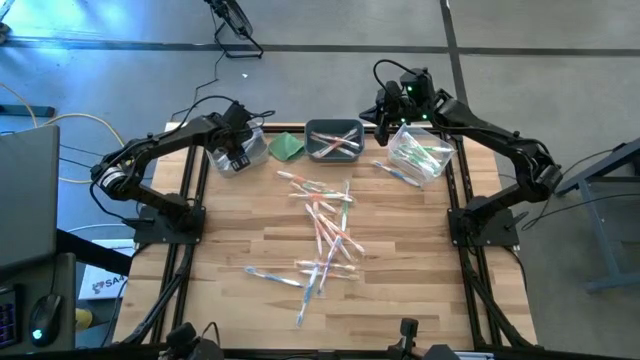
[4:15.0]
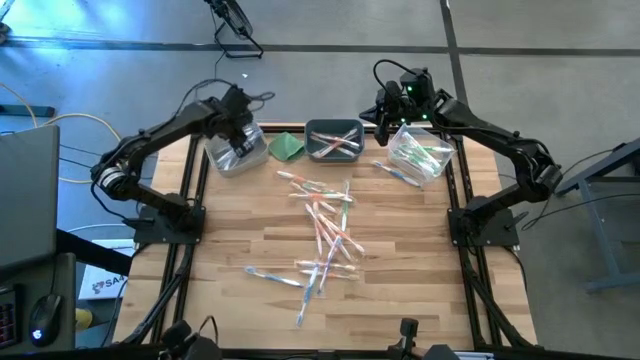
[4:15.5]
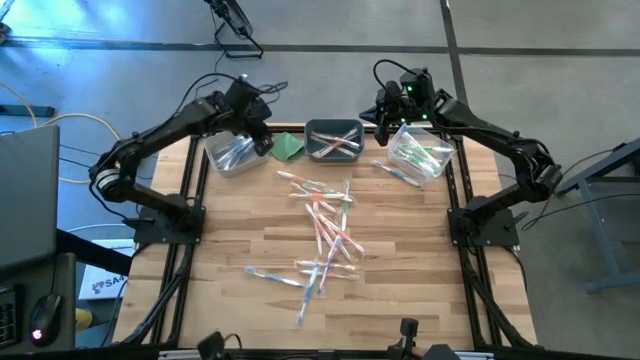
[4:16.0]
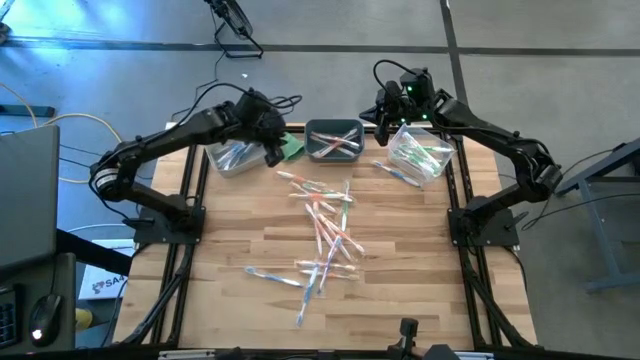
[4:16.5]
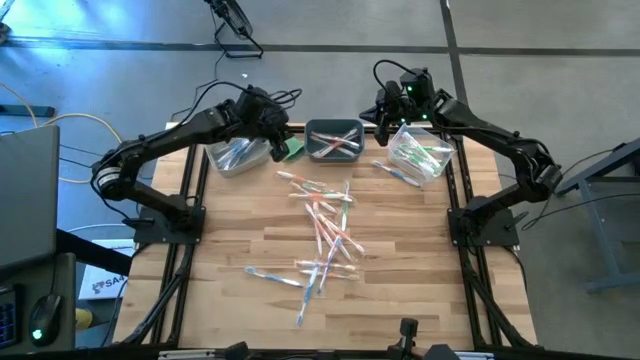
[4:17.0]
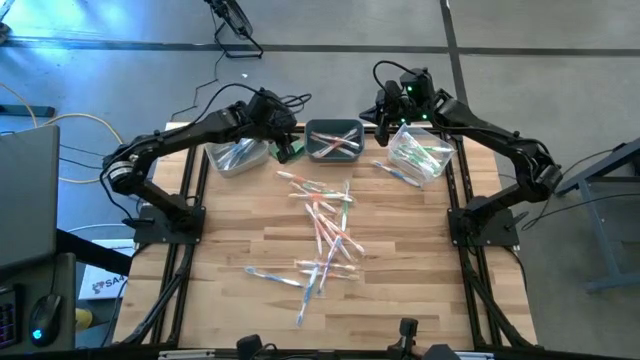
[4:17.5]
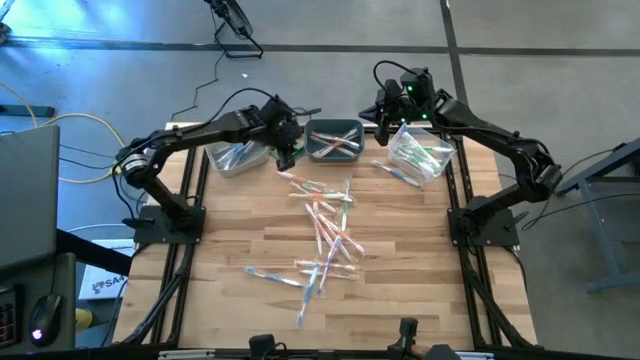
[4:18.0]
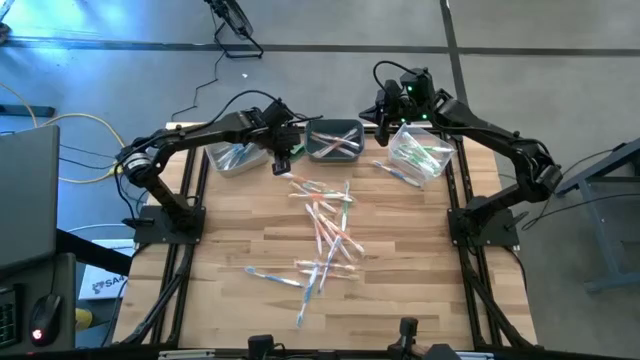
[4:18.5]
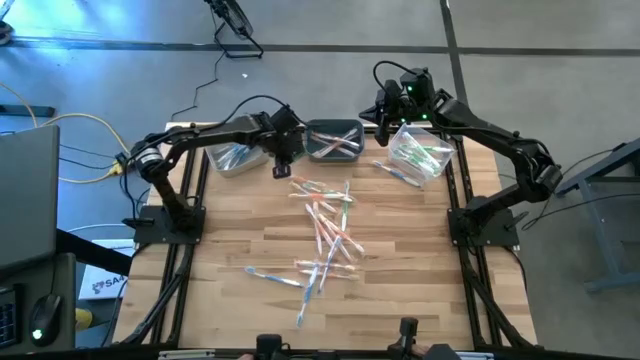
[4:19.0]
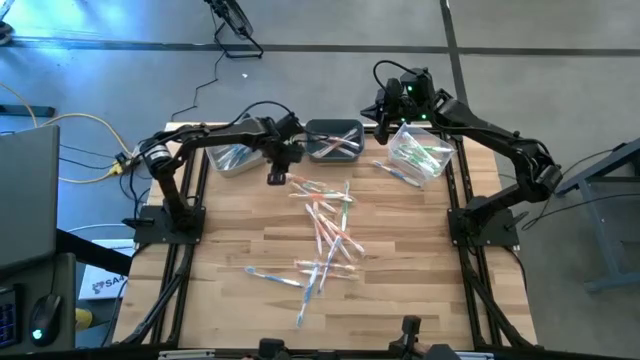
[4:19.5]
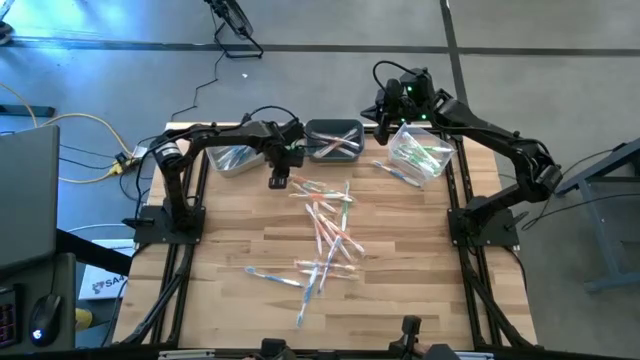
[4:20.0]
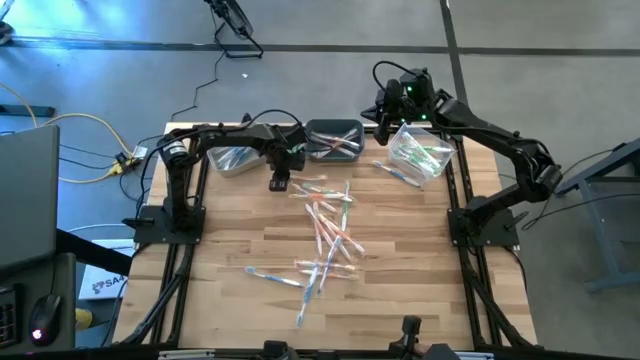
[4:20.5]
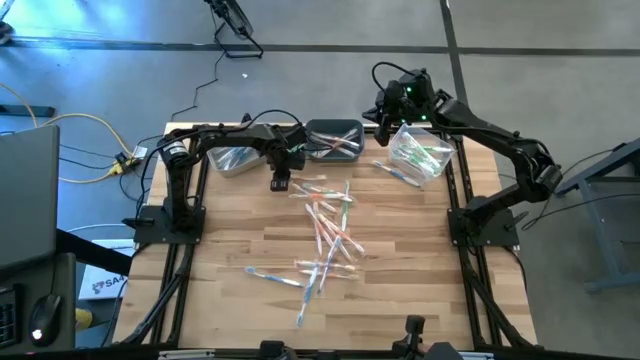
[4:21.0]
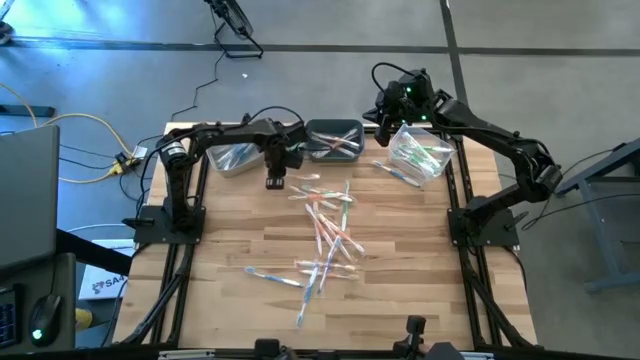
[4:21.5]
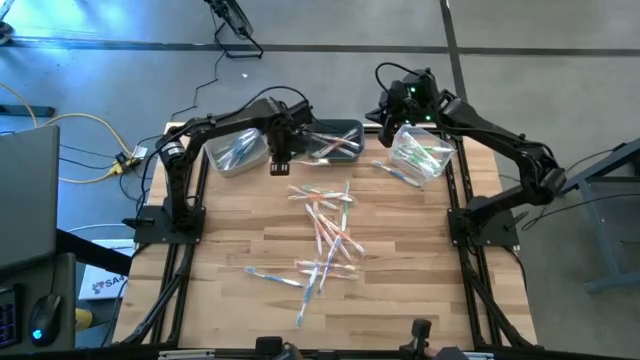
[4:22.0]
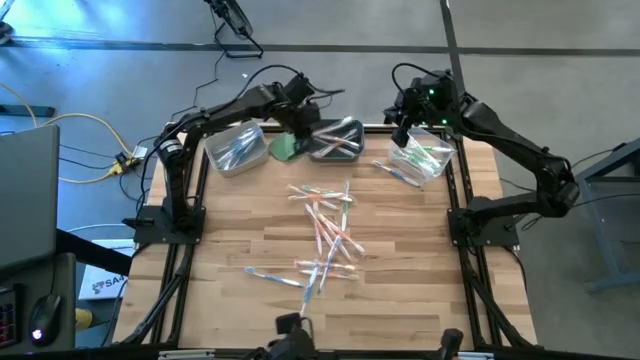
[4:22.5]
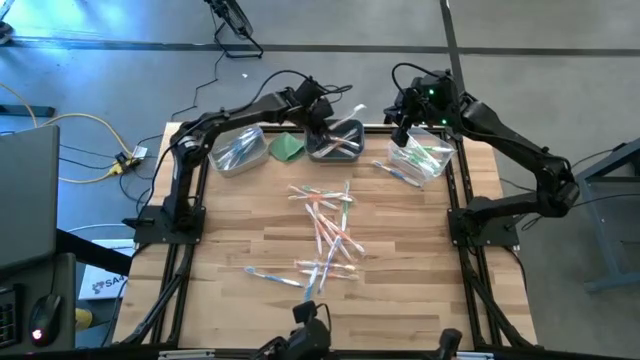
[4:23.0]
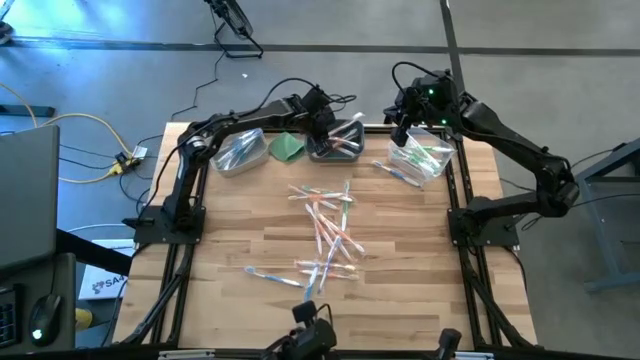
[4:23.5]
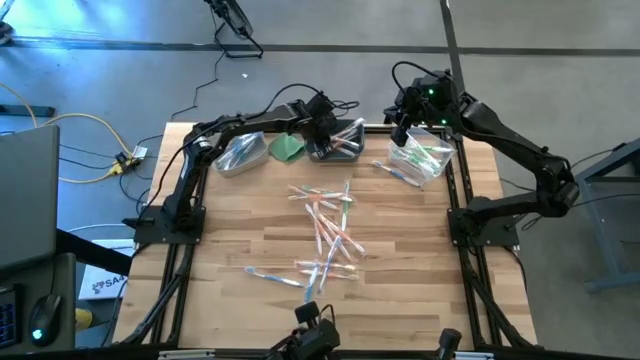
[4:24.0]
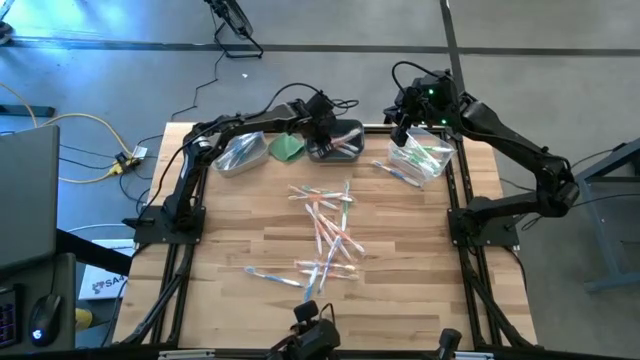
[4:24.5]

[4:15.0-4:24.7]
Task: Pick & Place Toothbrushes
Put the orange toothbrush into the blue bin

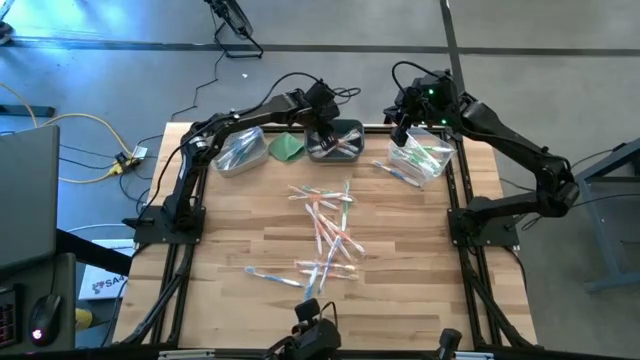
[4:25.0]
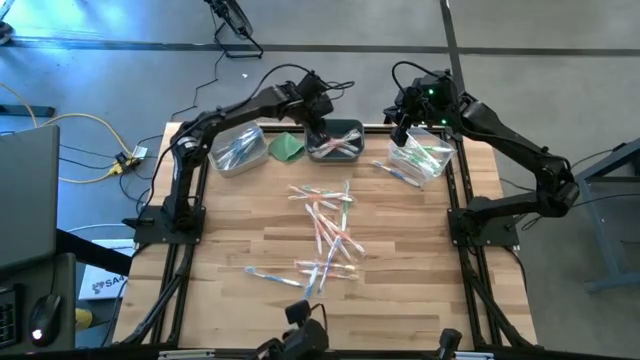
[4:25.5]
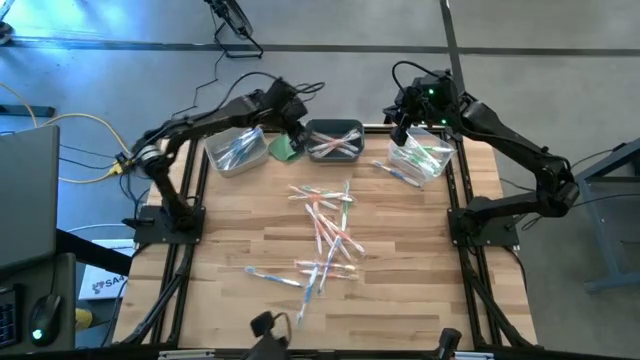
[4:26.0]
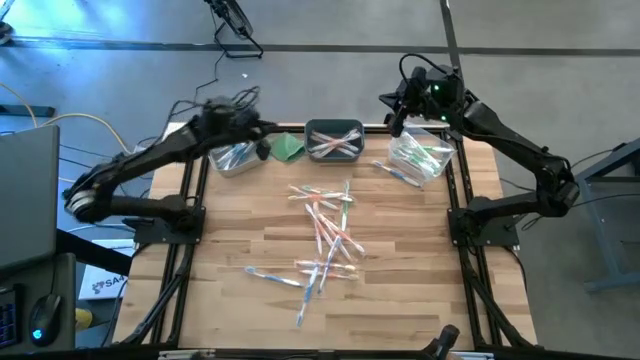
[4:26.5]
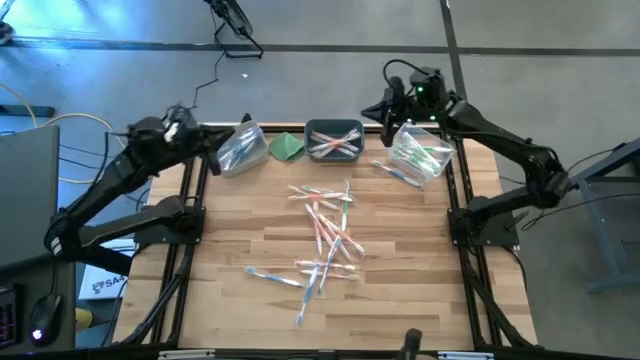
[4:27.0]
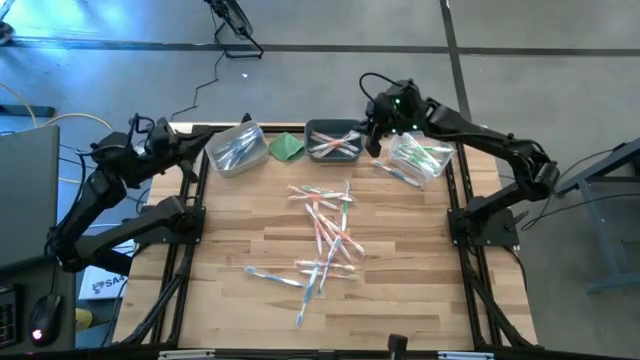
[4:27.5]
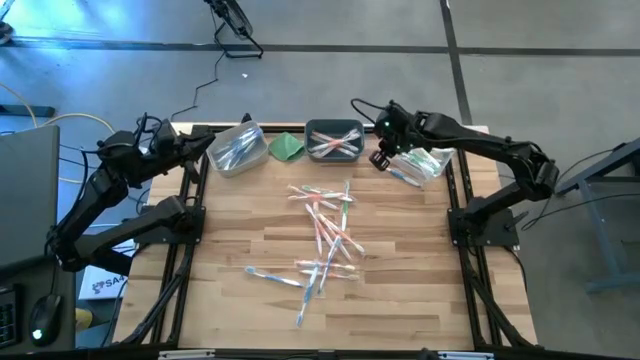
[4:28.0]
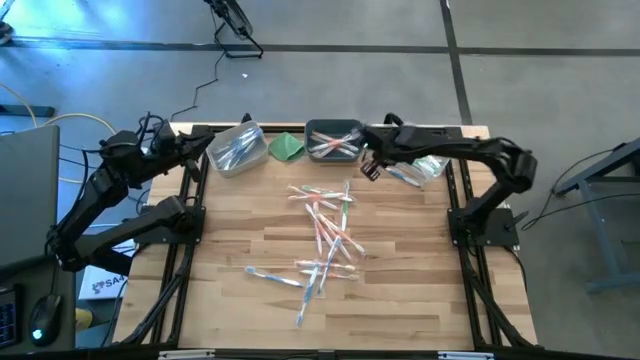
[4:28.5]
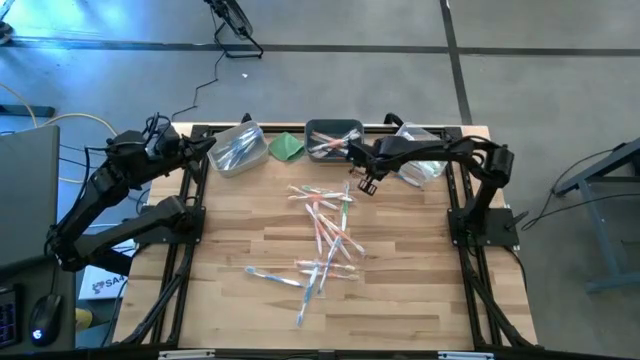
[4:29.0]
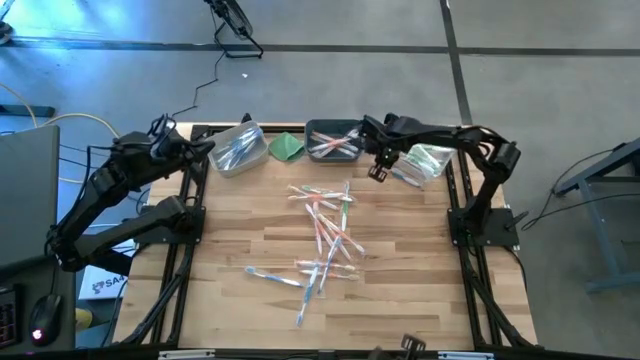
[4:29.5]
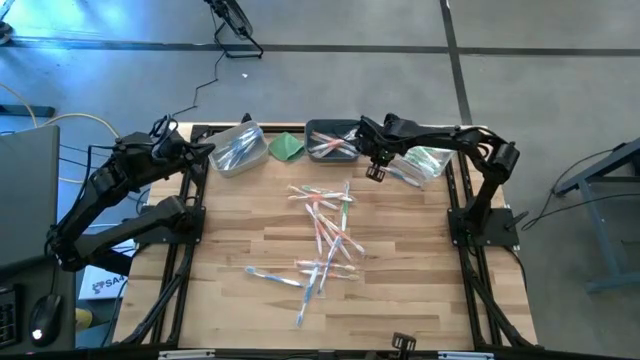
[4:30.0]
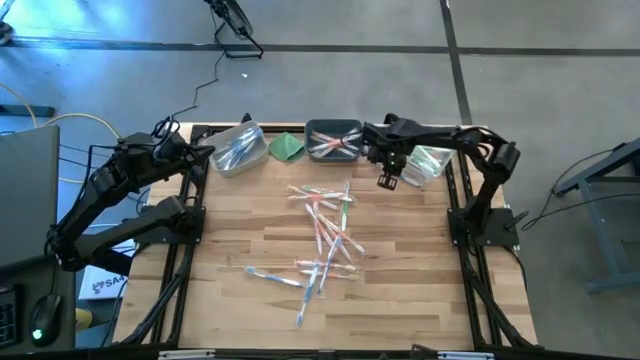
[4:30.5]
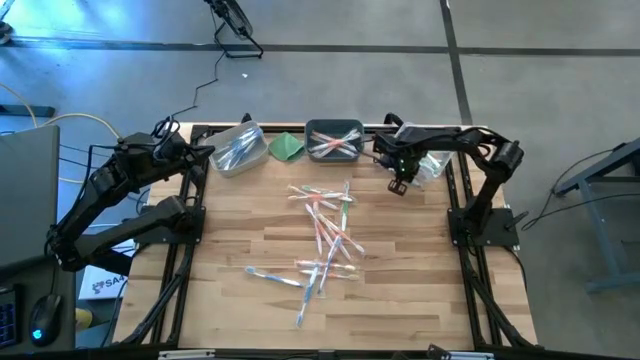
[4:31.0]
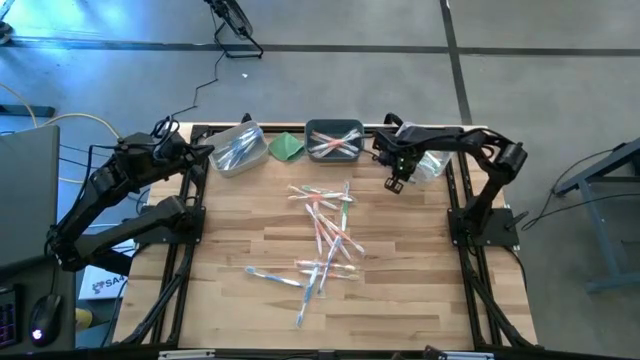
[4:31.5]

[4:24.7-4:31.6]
Put the blue toothbrush into the gray bin

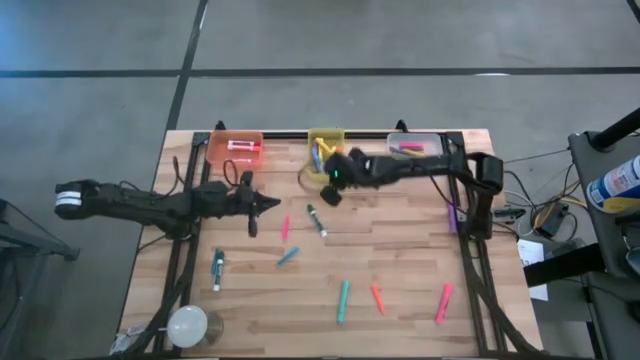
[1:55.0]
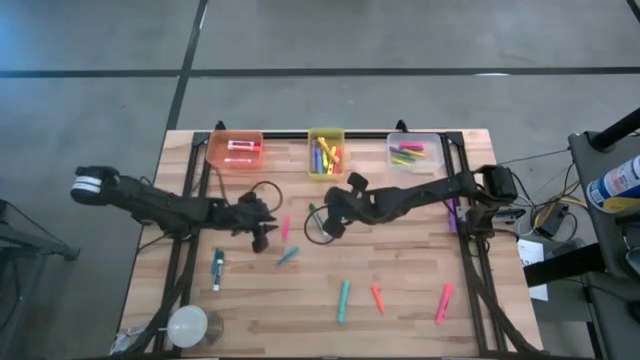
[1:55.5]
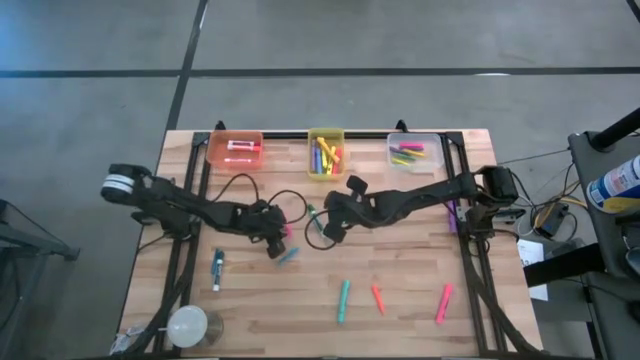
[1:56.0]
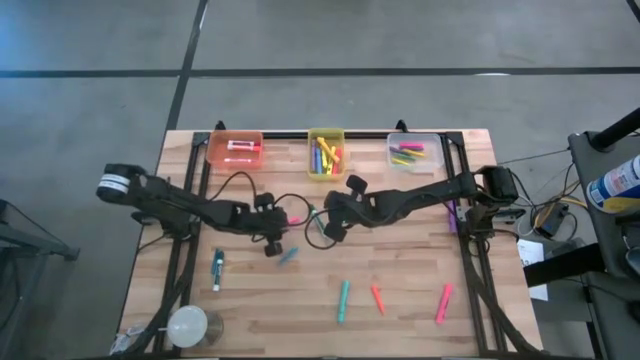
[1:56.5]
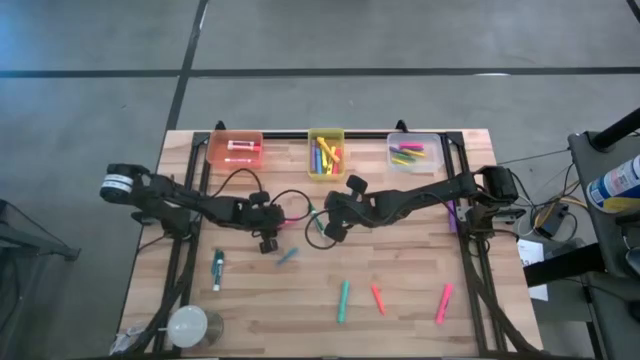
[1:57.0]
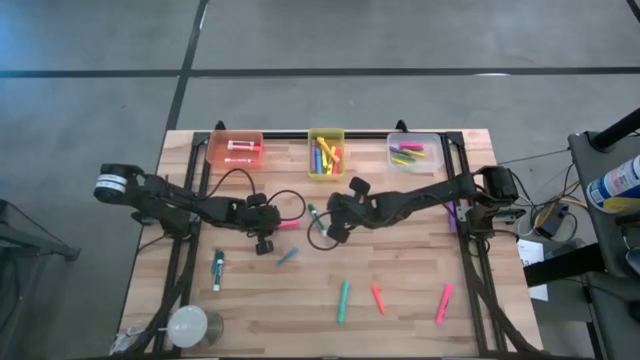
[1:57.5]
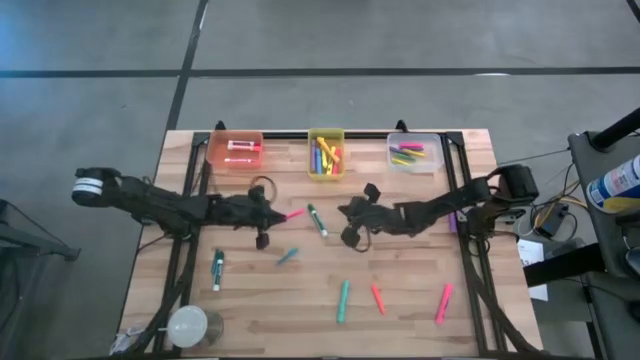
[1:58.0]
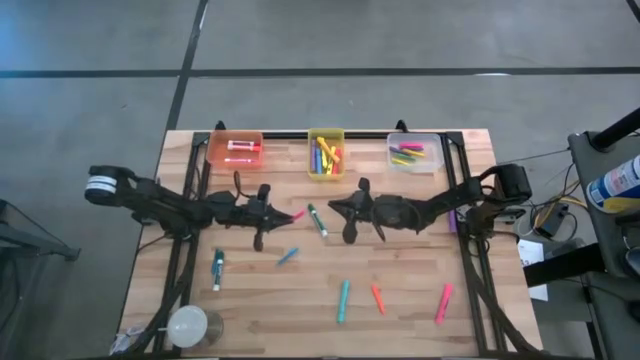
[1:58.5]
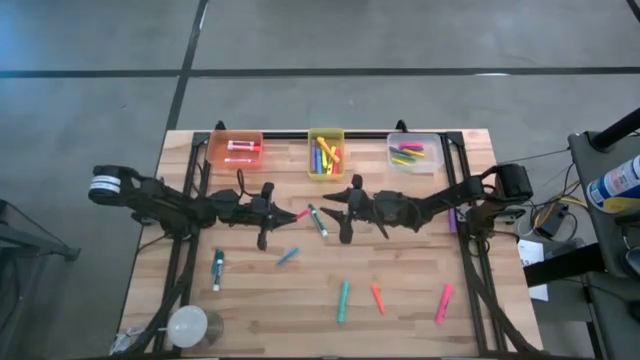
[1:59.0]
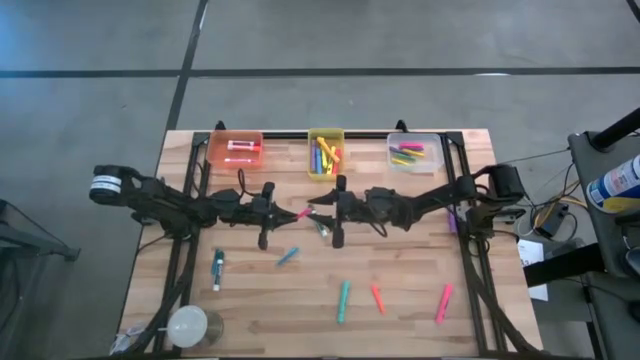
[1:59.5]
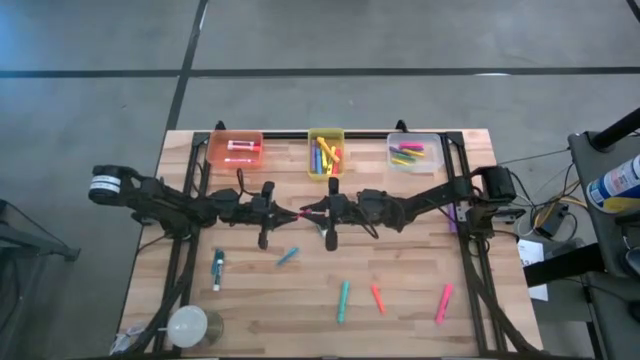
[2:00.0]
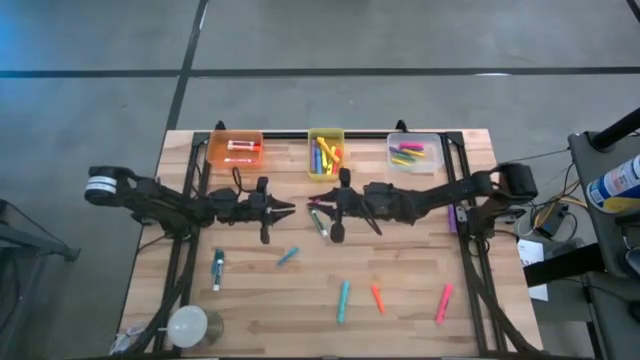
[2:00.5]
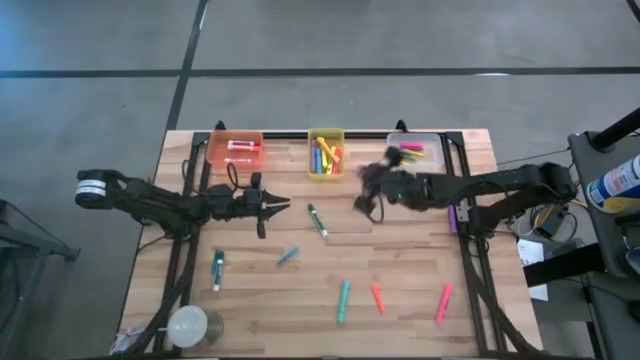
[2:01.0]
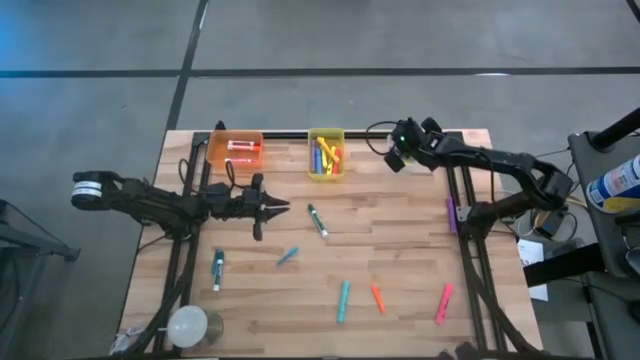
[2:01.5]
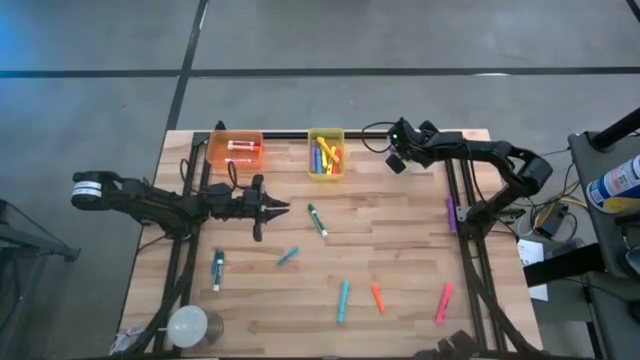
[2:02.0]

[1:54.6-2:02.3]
Task: Pick & Place Markers
Put the pink pen into the transparent bin
